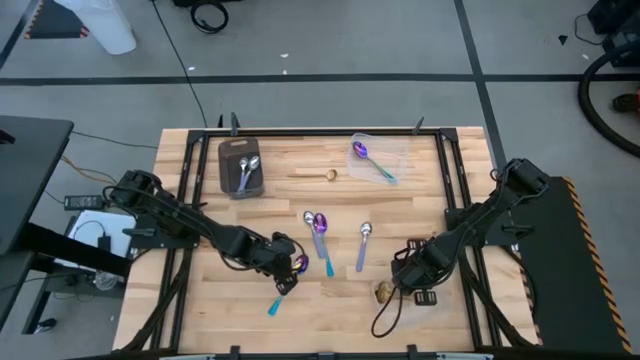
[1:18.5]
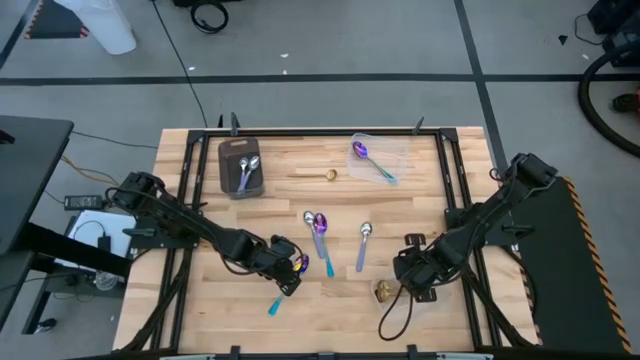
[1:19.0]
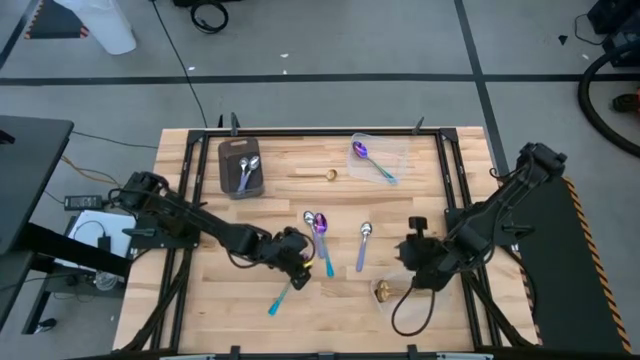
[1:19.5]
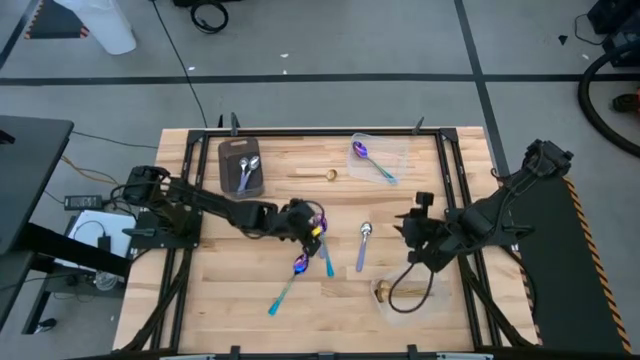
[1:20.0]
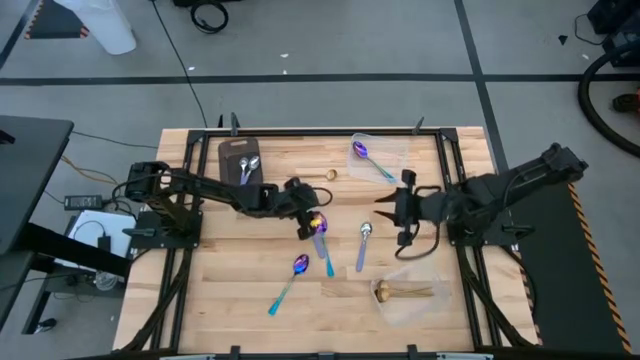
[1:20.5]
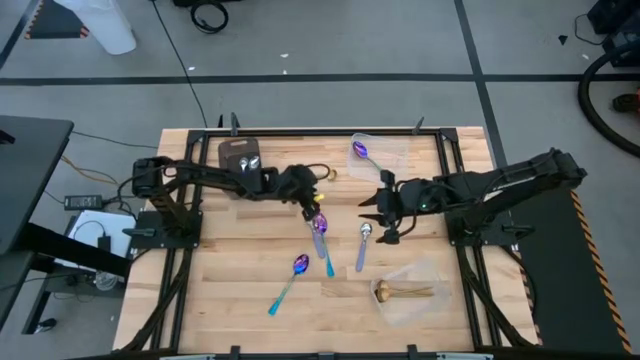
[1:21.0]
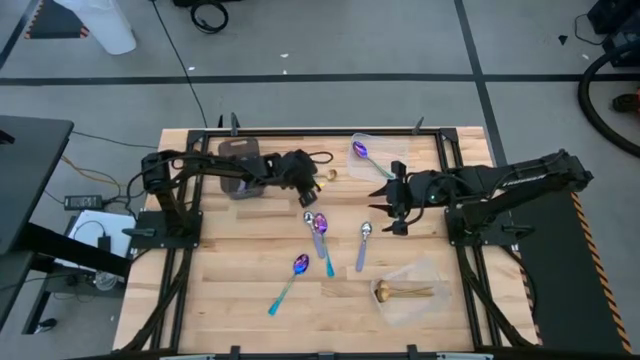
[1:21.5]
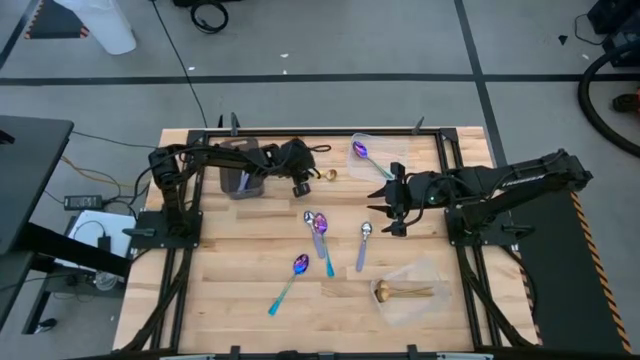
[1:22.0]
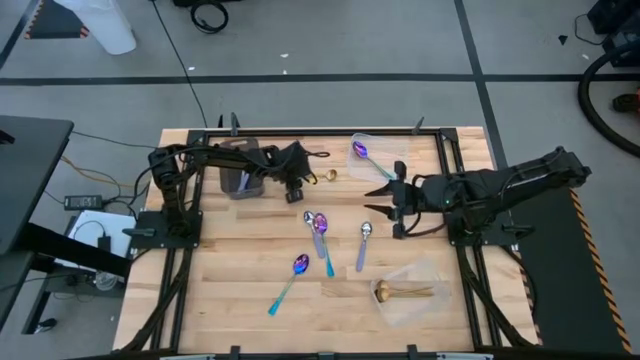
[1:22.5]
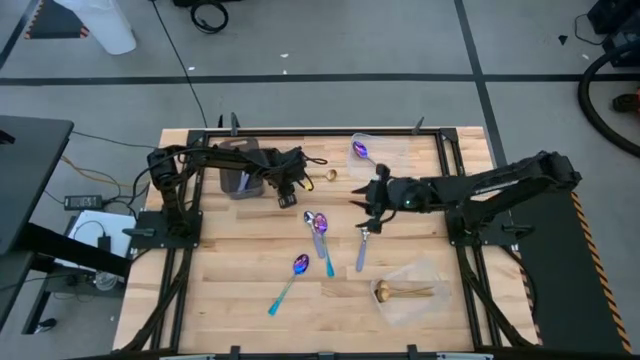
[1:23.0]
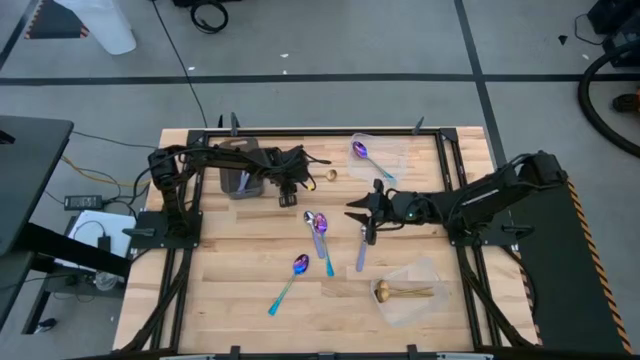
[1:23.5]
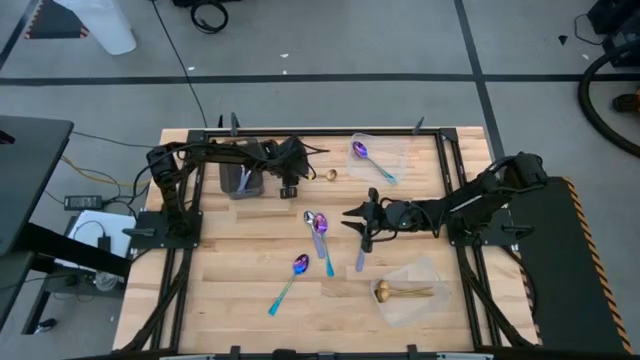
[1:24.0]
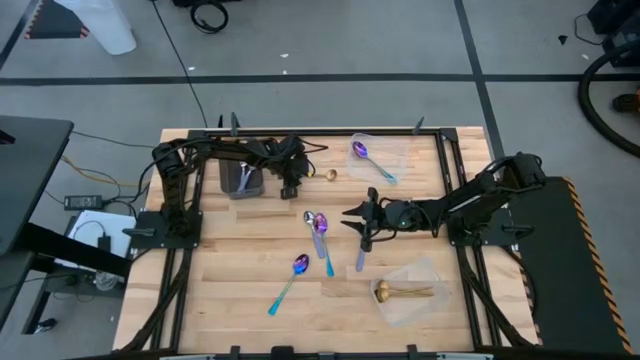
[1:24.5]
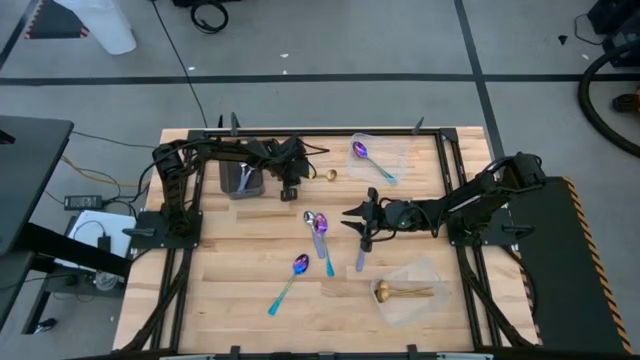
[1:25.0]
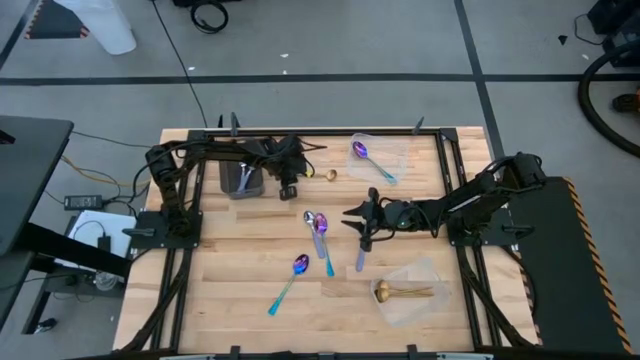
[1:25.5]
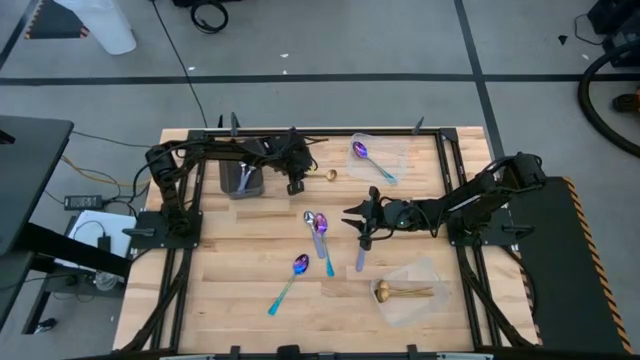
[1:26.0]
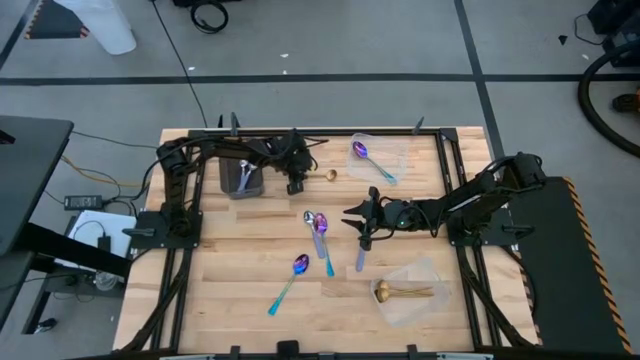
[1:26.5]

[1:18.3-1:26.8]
Task: Sort silverware by color (type)
Put the yellow spoon into the bottom transparent bin

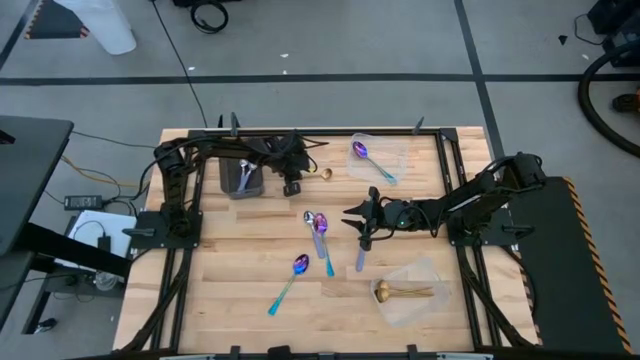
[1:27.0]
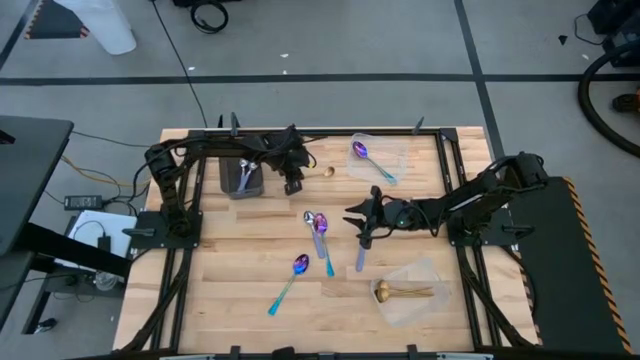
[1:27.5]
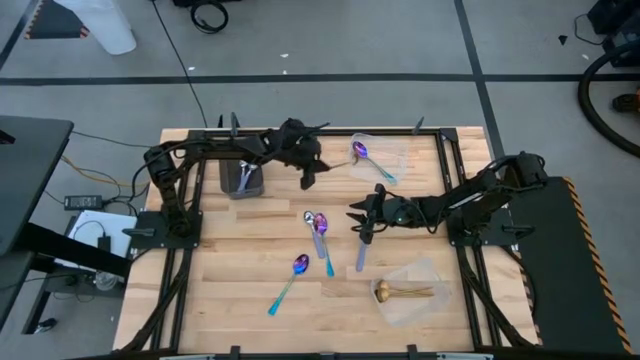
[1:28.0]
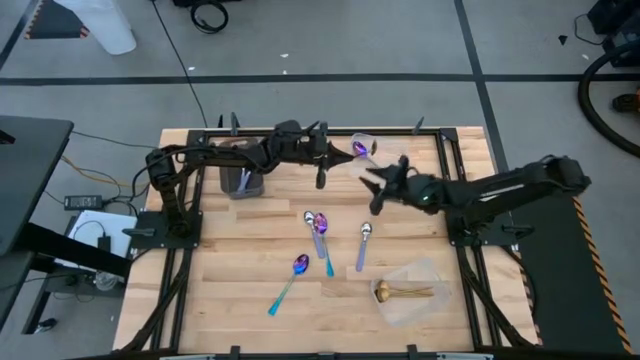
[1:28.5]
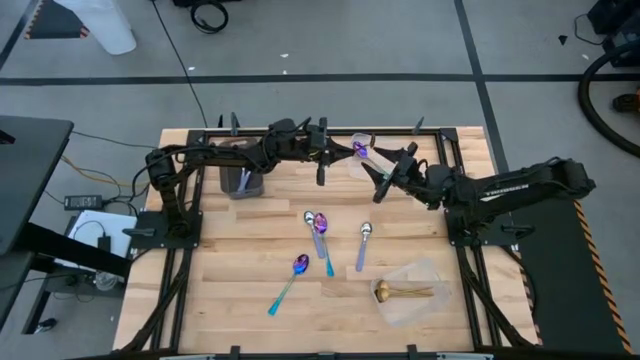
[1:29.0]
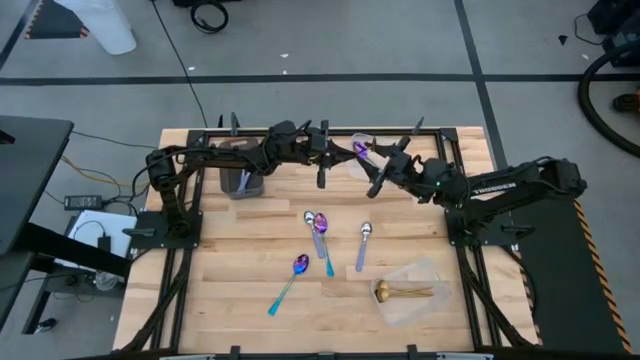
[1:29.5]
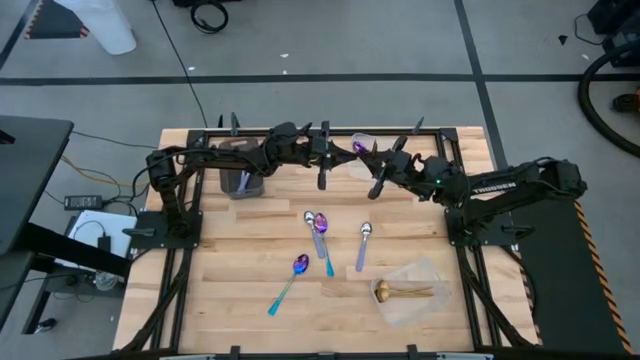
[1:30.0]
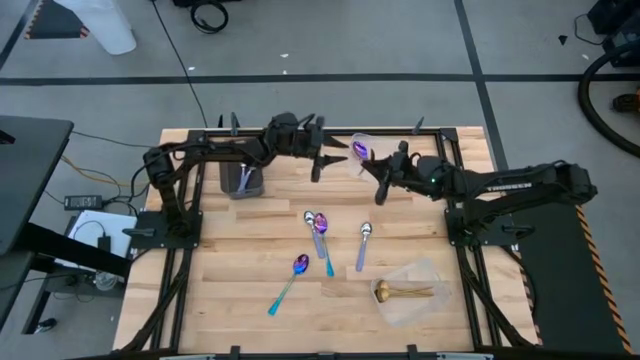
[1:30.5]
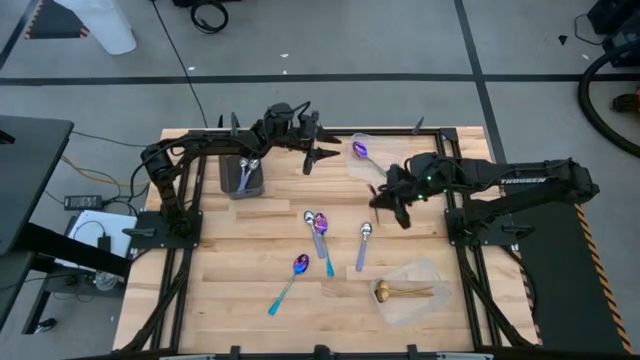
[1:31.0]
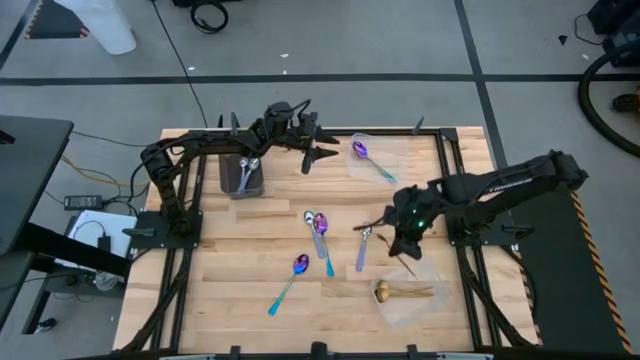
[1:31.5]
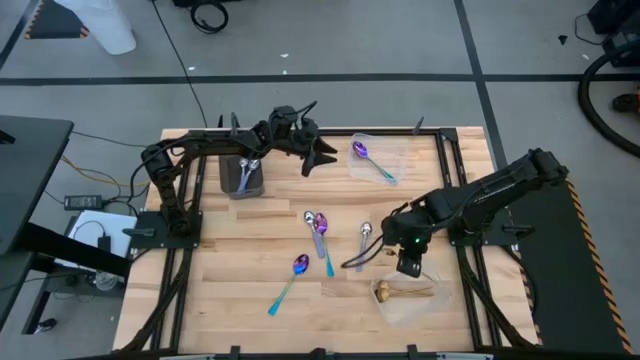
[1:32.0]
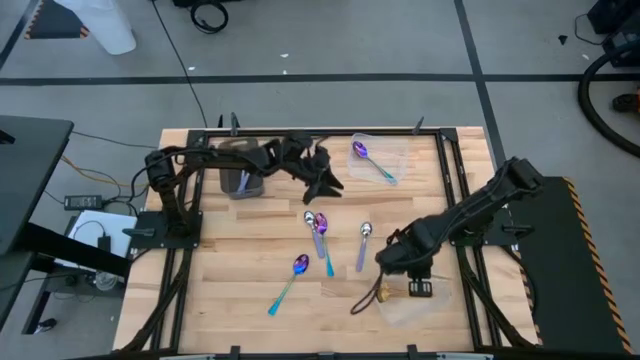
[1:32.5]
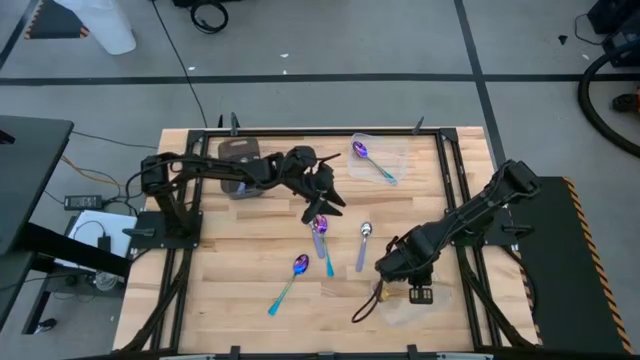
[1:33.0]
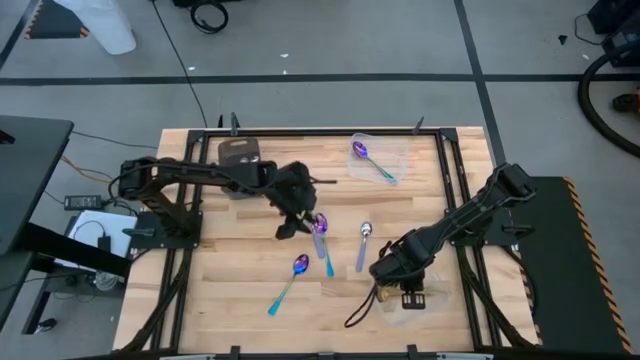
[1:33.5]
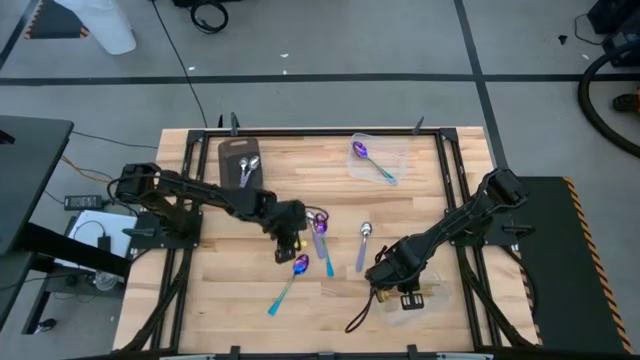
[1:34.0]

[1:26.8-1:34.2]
Put the yellow spoon into the bottom transparent bin

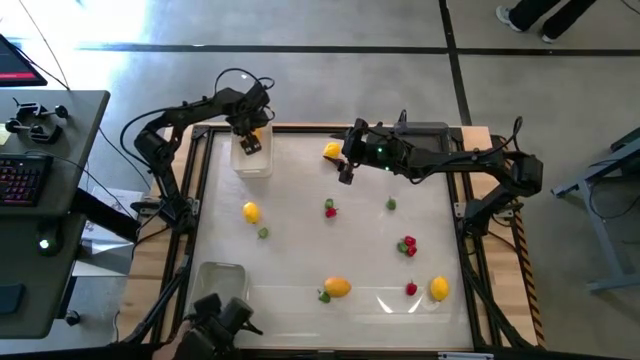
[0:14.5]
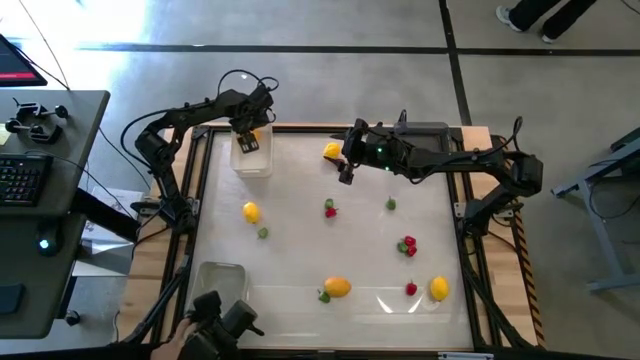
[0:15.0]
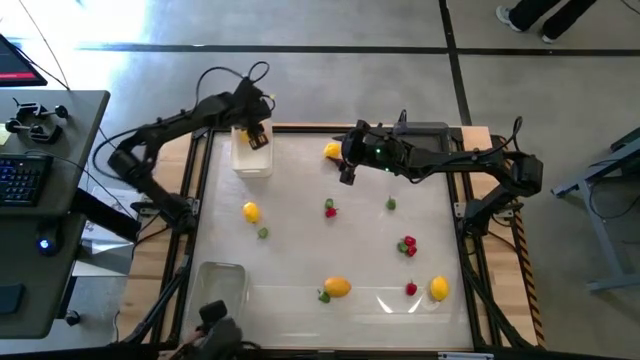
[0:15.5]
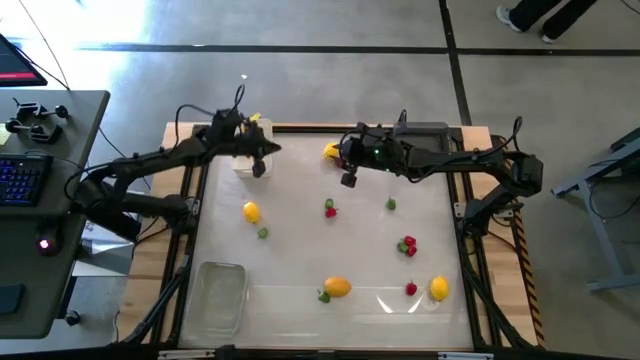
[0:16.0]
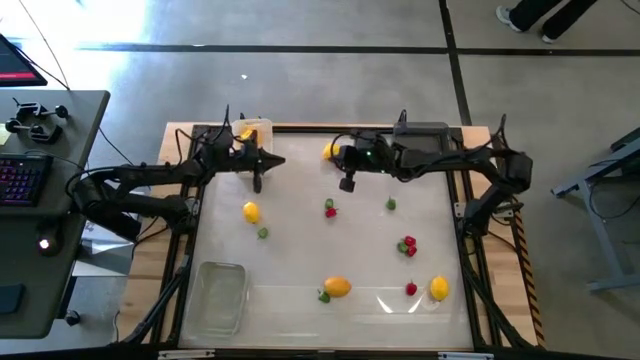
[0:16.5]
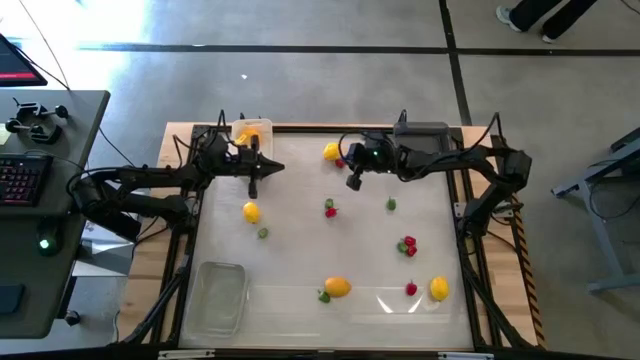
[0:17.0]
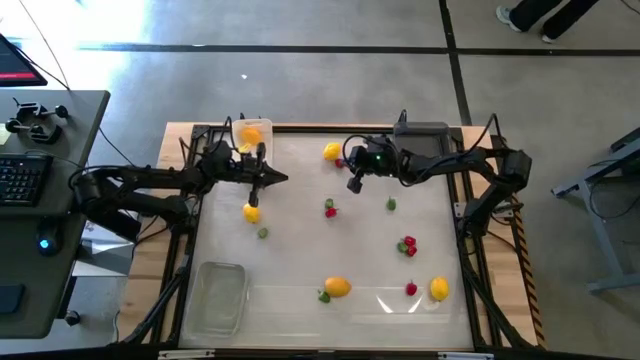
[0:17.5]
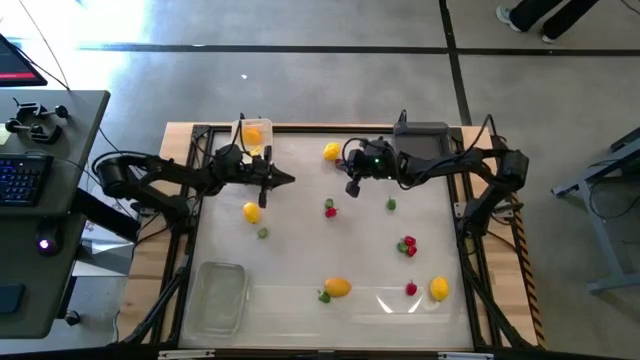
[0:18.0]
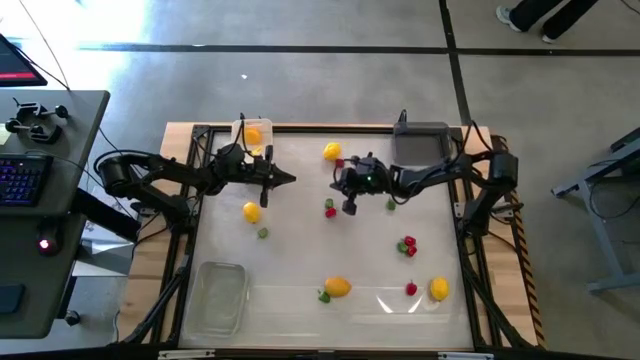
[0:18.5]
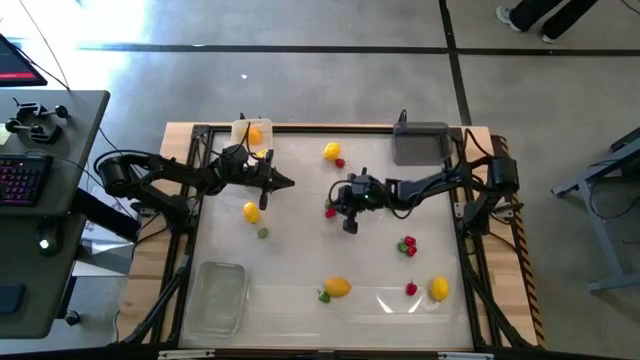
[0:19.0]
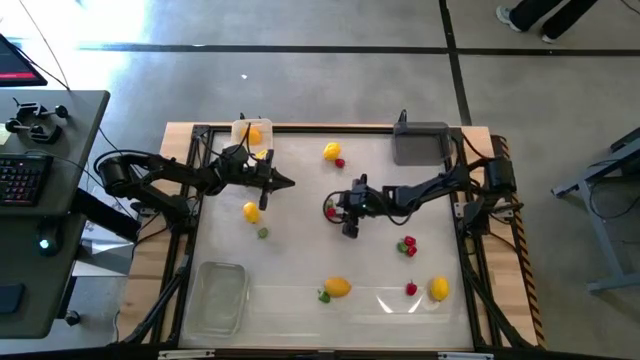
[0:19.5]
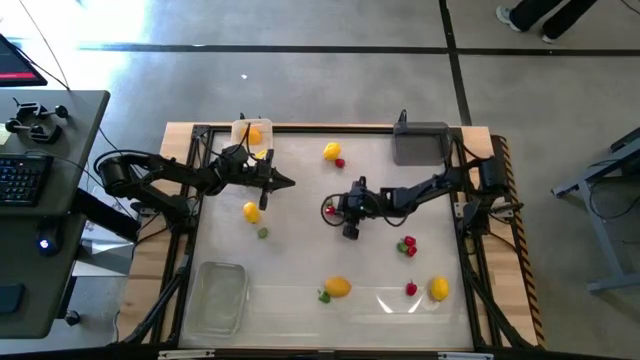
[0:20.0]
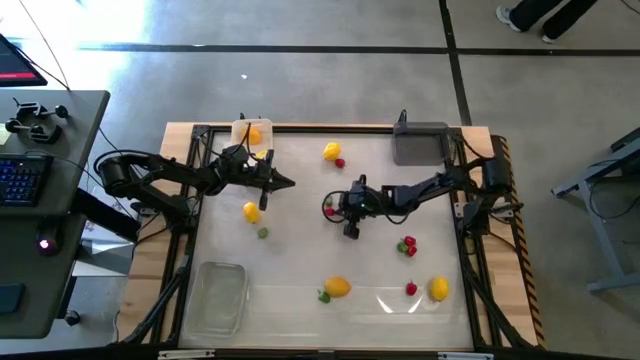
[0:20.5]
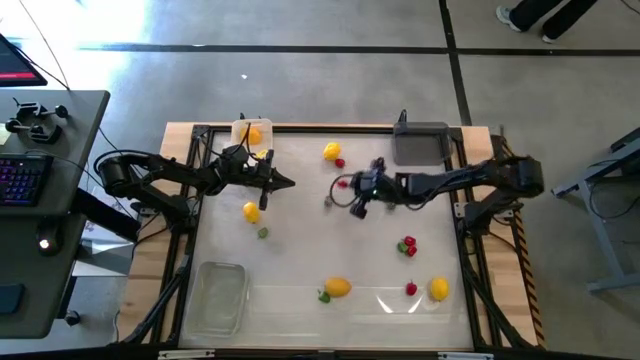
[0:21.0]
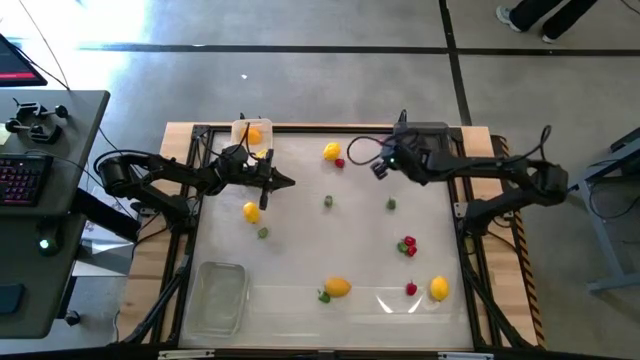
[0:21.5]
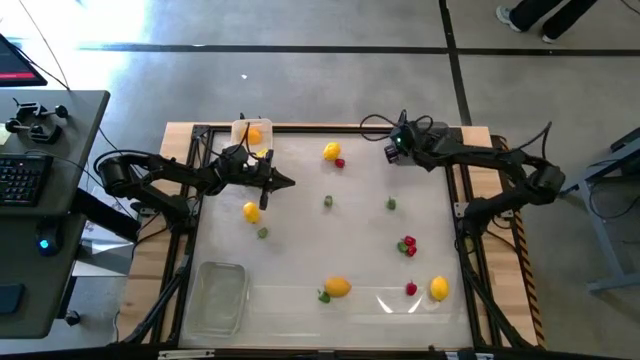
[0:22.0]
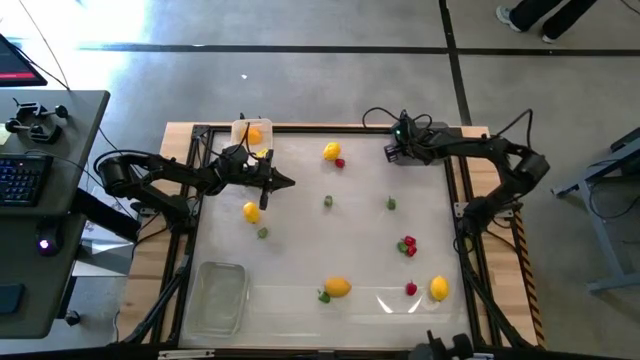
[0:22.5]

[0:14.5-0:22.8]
Task: Sort produce into baskets
Put the red bell pepper into the black bin
